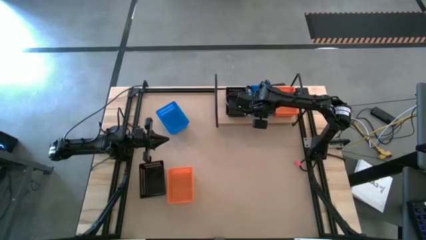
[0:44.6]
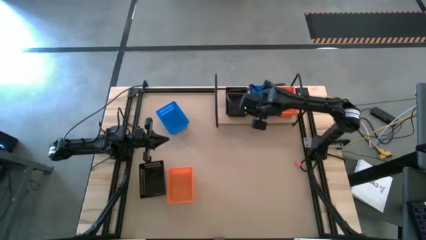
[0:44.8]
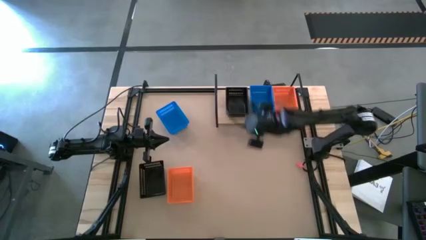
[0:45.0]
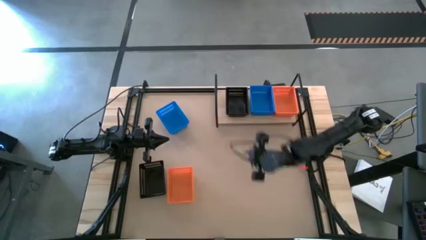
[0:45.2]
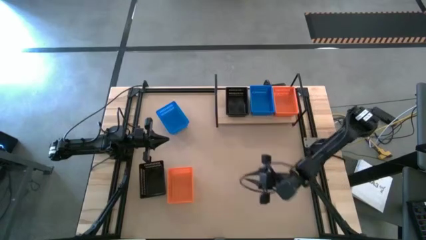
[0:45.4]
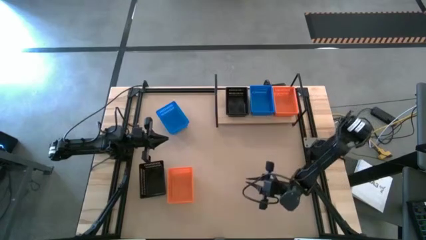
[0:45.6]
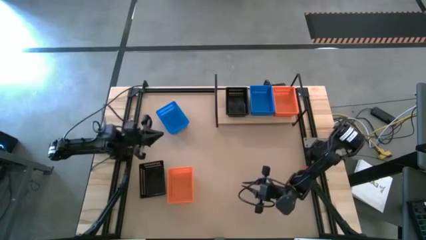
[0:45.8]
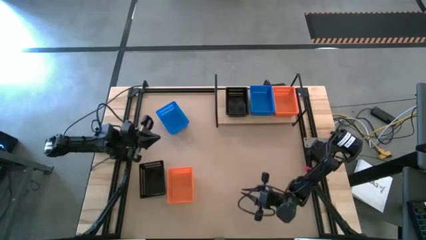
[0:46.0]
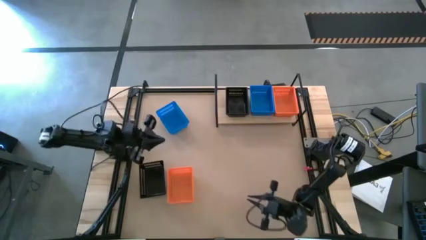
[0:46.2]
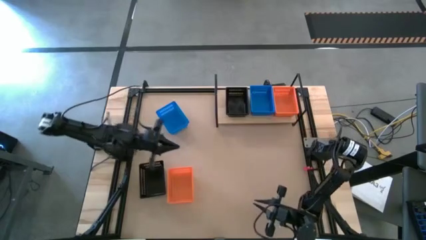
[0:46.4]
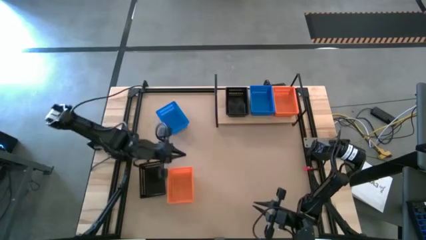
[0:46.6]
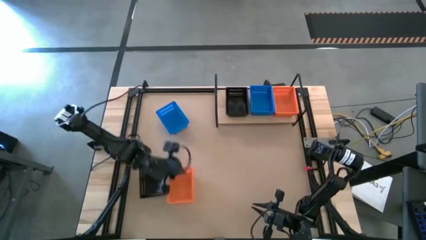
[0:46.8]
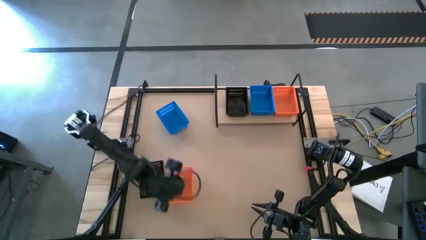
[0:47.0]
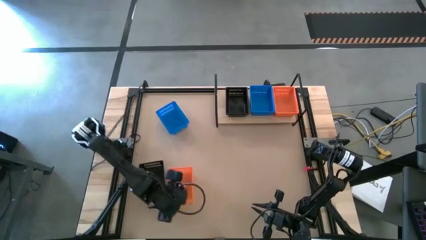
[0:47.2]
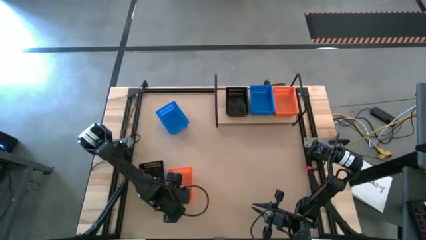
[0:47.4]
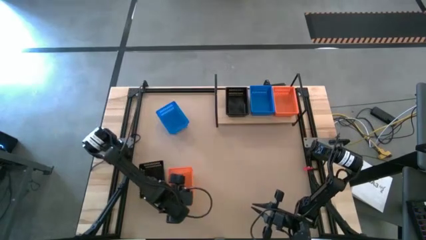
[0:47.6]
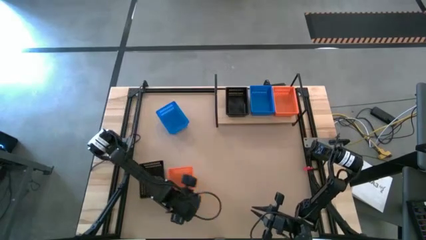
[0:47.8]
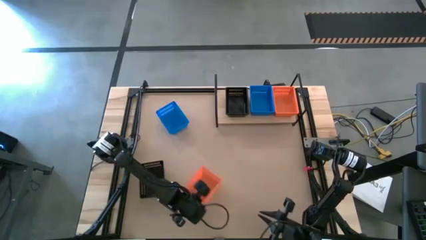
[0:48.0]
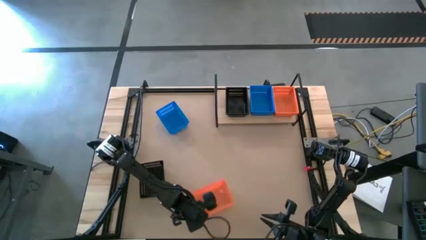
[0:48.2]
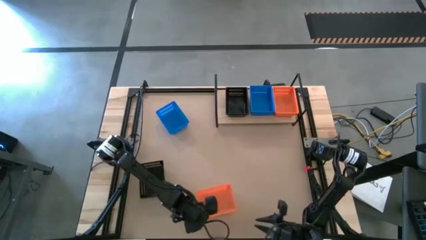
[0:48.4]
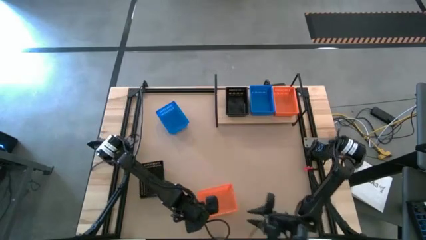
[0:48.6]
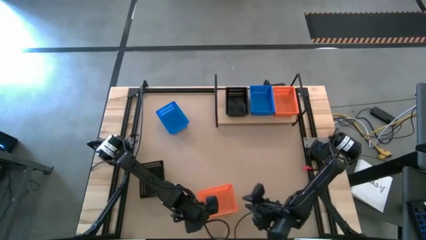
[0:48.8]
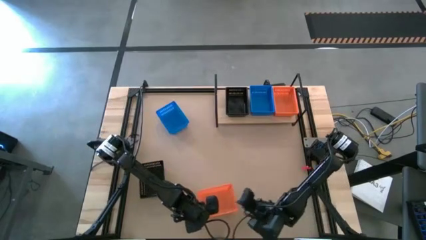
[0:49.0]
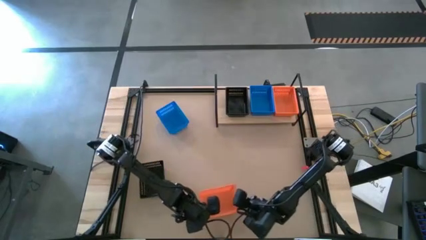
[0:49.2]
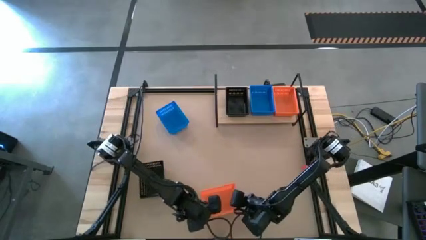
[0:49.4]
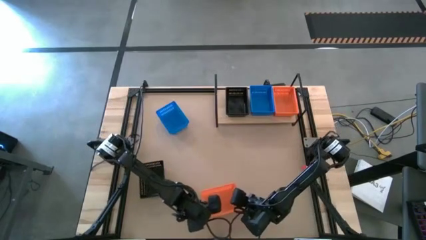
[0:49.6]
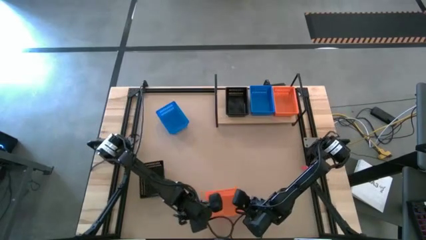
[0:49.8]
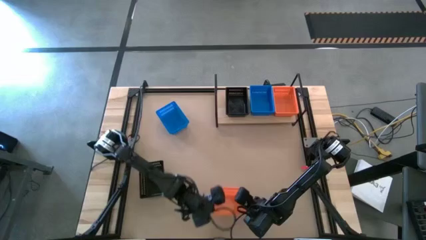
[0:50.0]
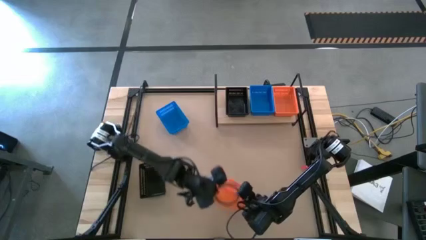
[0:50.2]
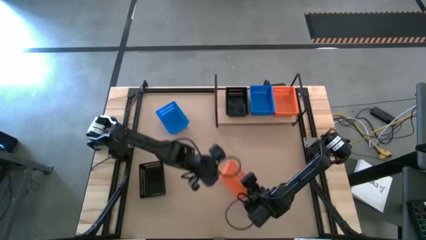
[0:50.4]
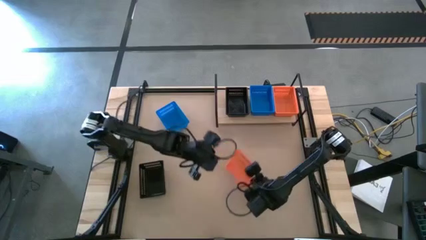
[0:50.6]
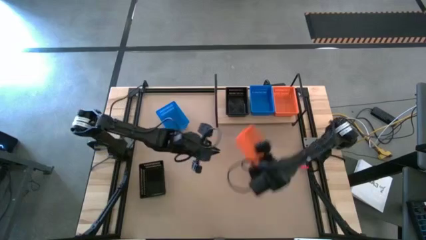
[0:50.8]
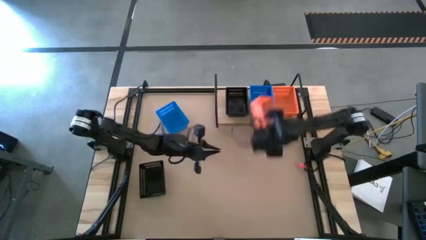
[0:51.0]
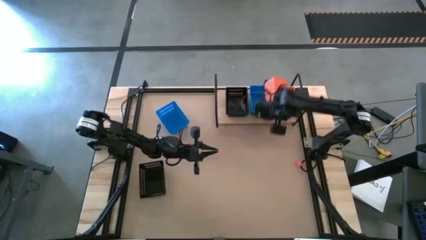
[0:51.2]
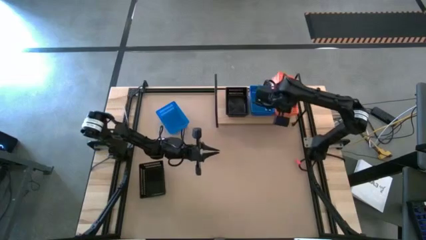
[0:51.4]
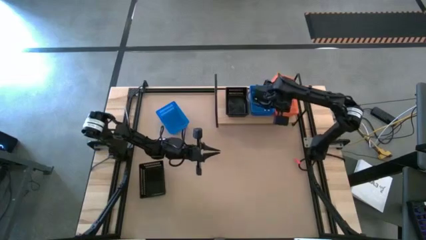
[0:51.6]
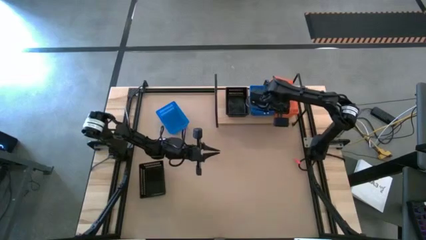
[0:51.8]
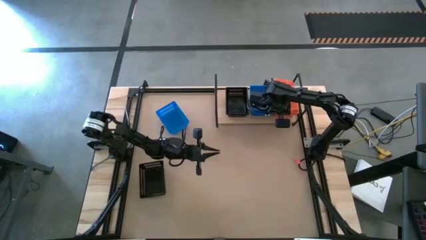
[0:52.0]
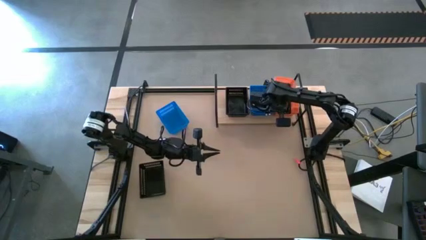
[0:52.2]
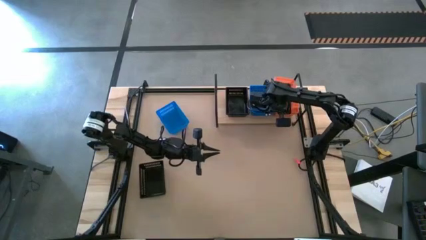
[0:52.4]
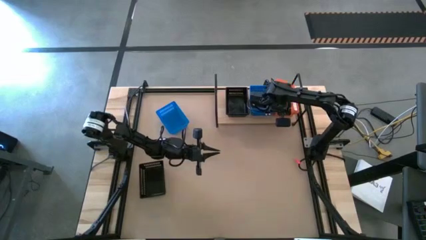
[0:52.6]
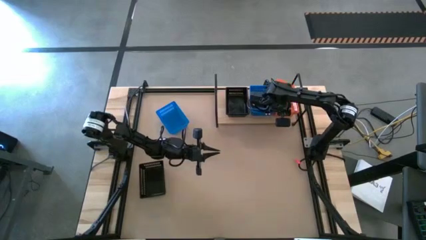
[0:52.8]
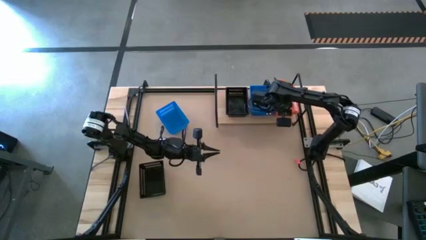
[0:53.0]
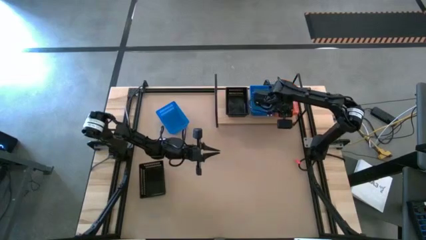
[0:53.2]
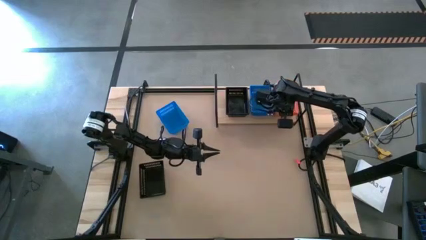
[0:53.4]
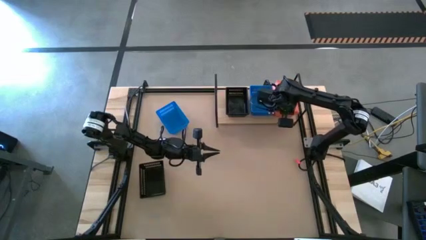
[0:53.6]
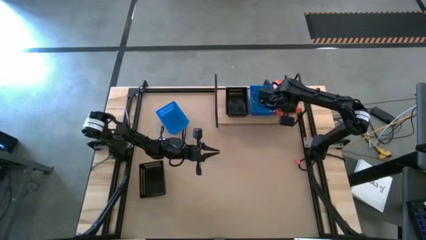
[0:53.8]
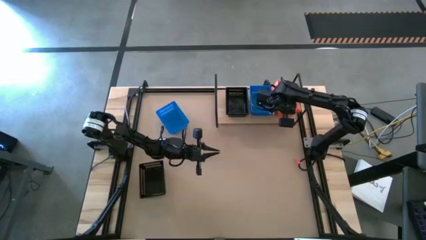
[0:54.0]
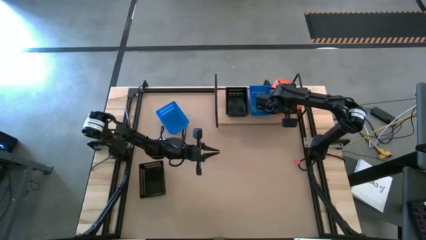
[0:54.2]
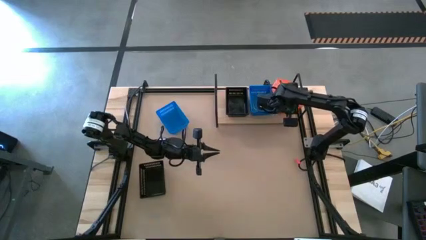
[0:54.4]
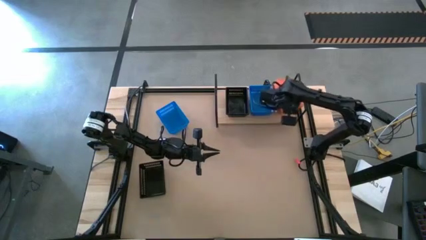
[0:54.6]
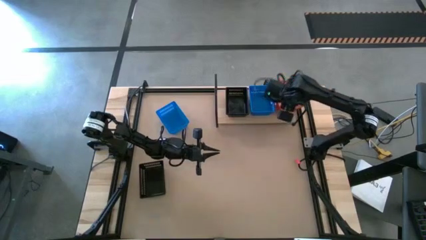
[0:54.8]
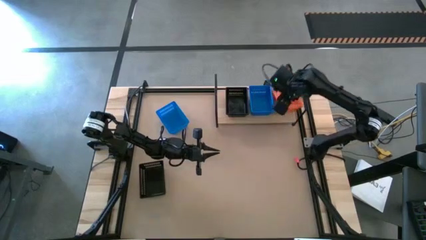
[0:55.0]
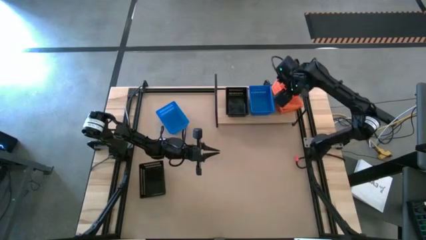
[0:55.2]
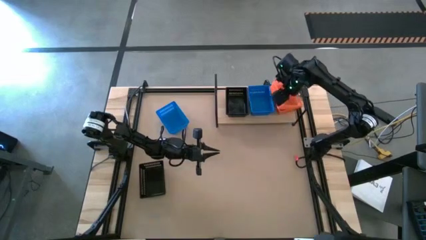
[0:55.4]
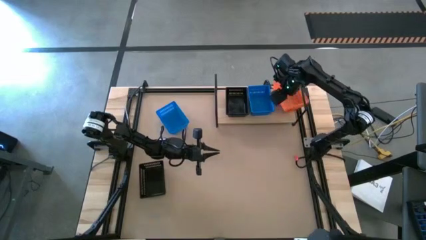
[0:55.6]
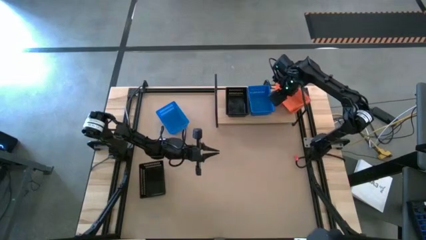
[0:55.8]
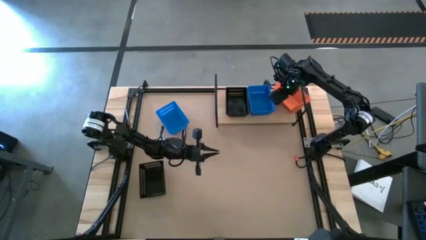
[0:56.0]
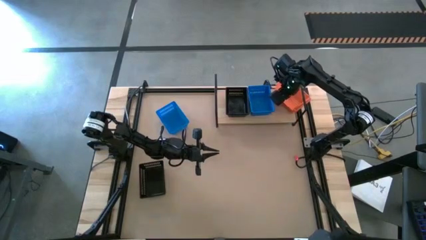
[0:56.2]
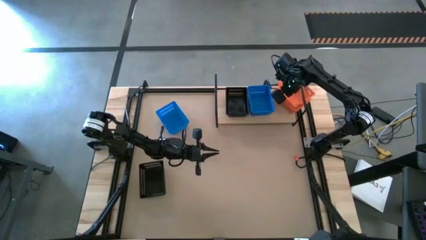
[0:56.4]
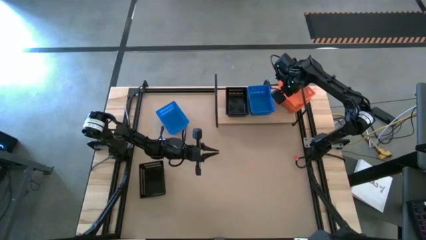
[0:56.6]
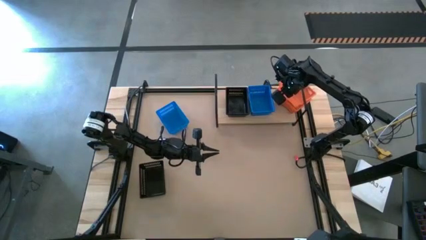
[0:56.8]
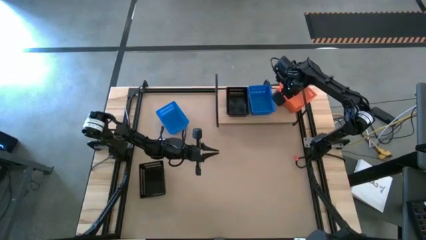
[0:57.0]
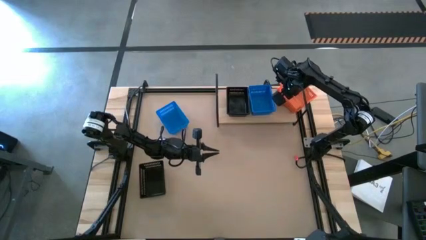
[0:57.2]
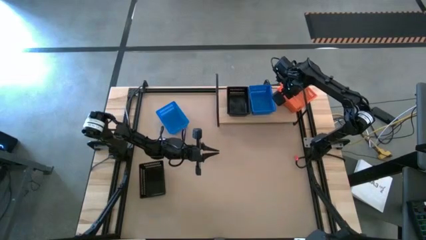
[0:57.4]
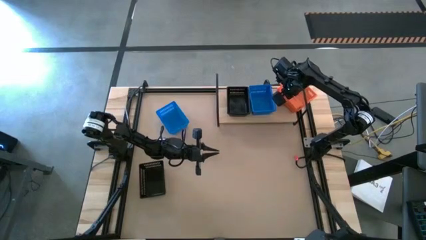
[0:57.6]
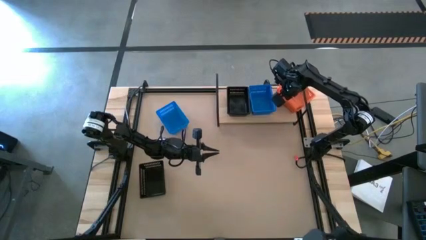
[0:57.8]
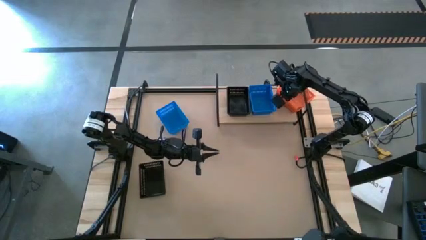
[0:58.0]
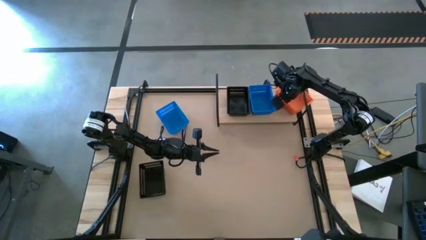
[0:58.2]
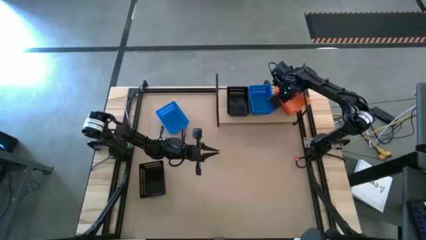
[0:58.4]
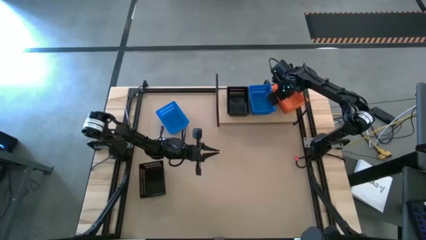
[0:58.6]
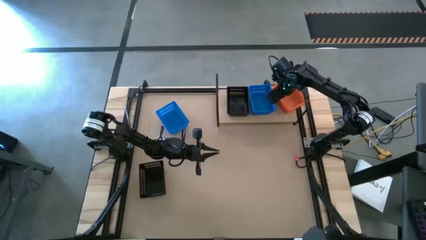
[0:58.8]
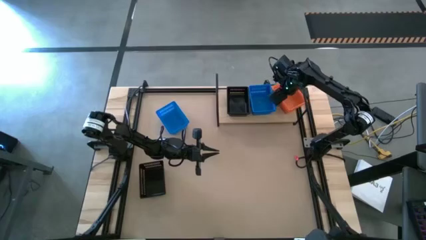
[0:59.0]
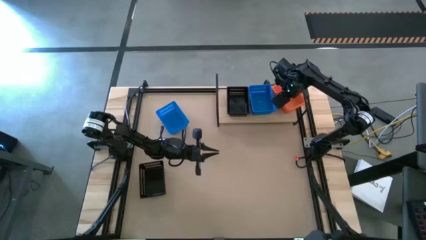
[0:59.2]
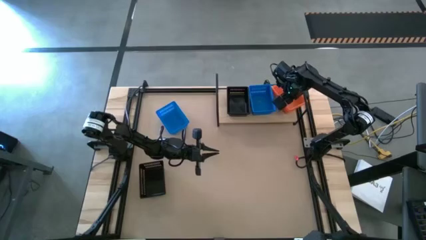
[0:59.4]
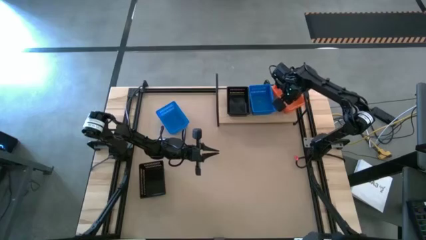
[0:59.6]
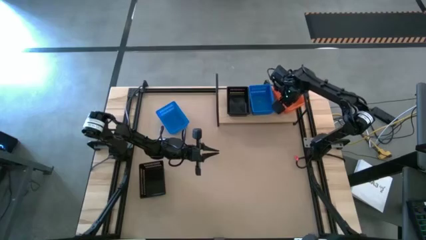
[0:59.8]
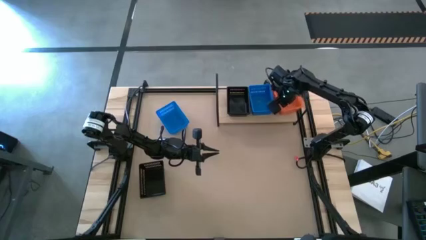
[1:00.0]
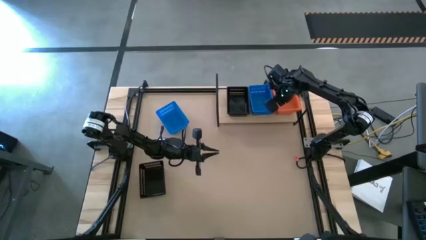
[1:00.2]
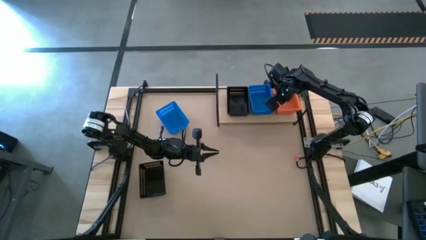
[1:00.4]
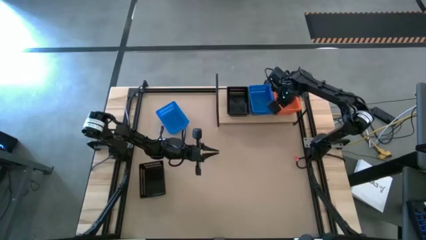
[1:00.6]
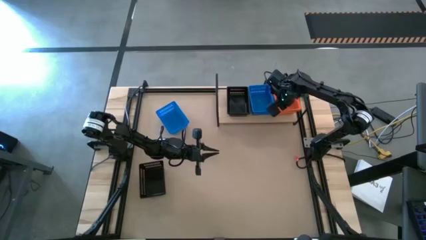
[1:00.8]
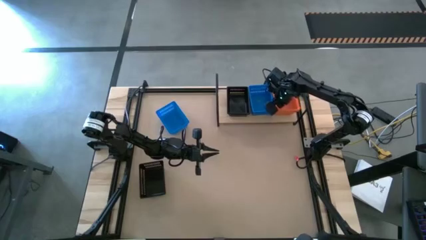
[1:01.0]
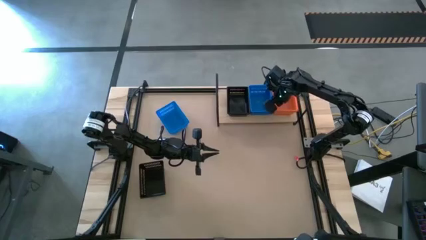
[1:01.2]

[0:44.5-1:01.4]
Task: Stack baskets on shelf by color
Stack the orange bin on top of the other orange bins on the shelf
